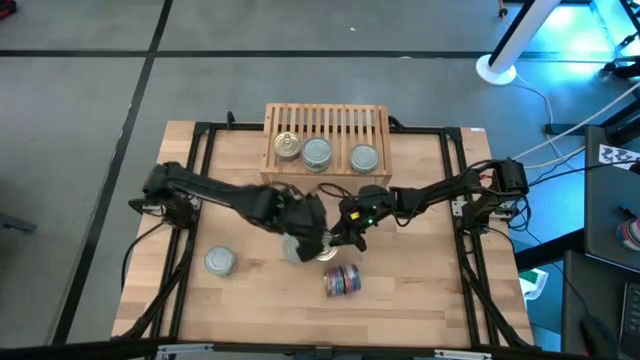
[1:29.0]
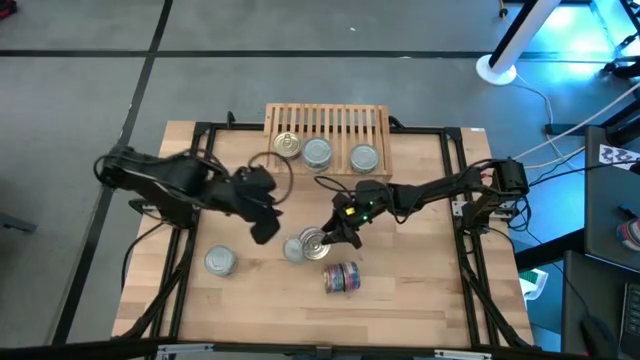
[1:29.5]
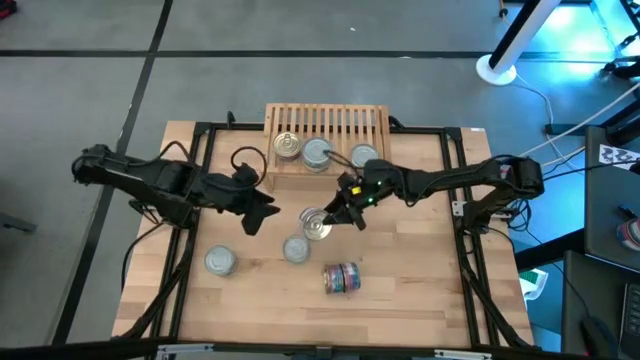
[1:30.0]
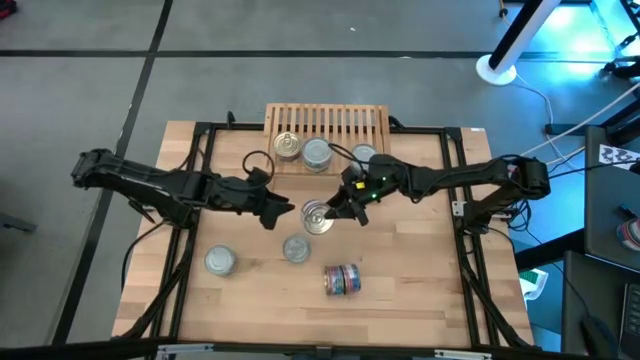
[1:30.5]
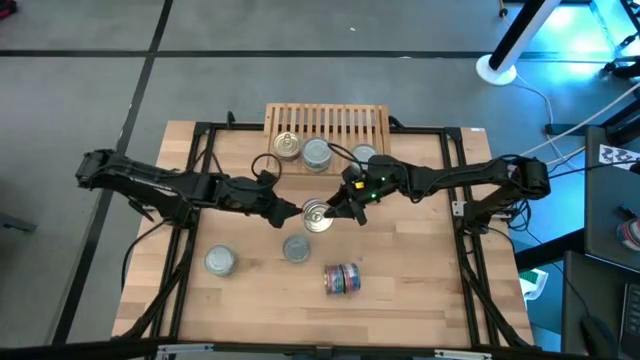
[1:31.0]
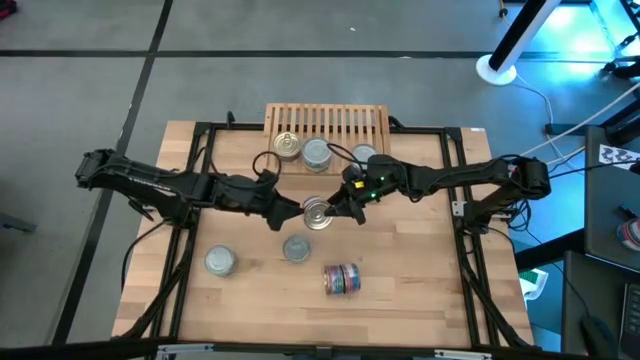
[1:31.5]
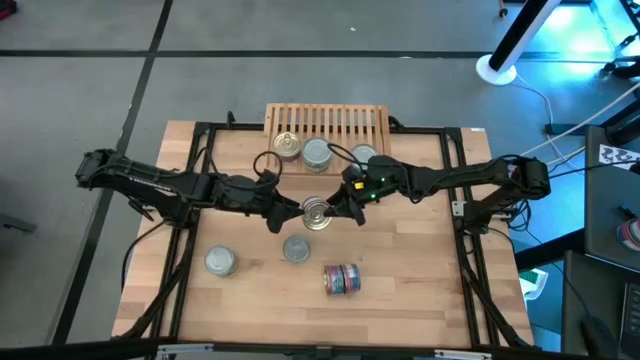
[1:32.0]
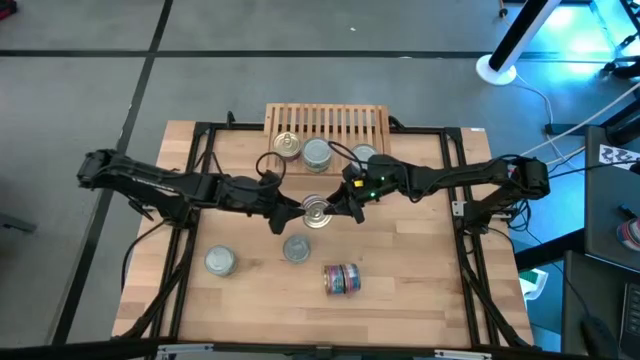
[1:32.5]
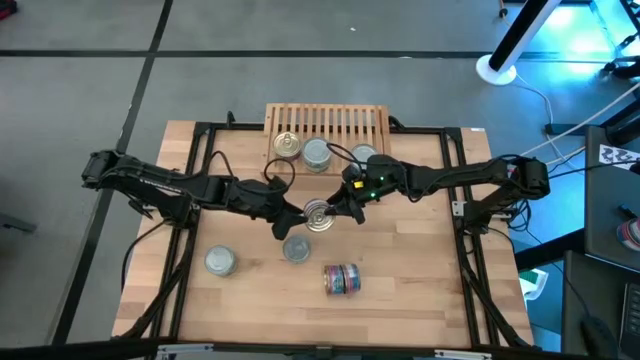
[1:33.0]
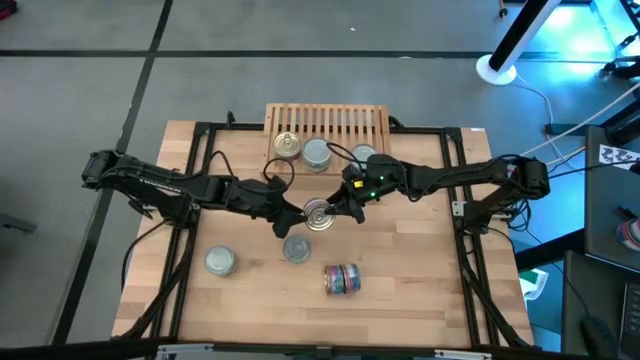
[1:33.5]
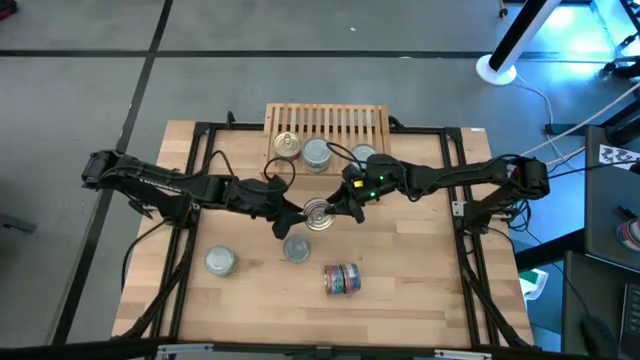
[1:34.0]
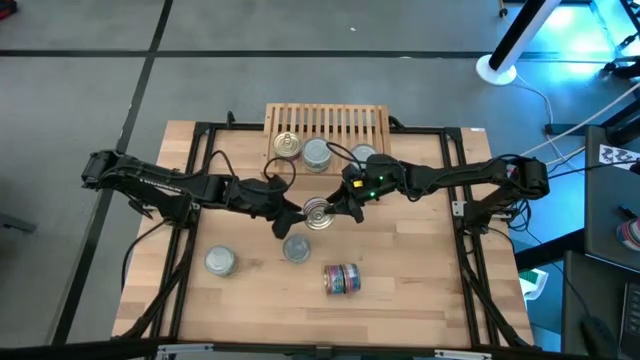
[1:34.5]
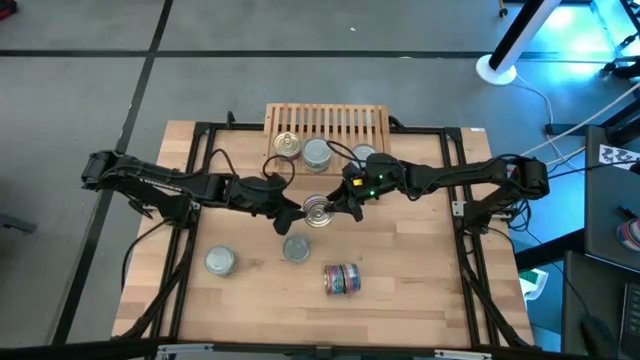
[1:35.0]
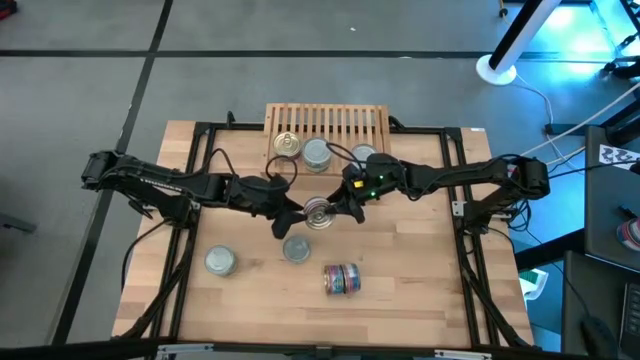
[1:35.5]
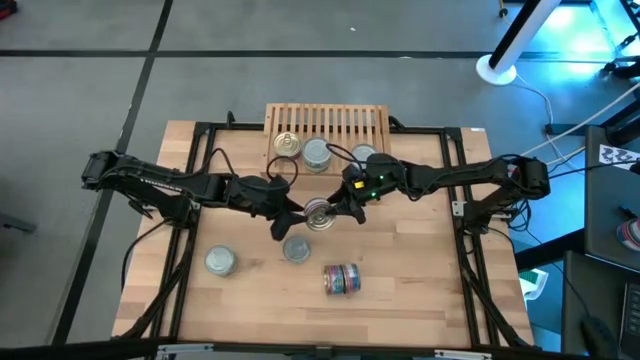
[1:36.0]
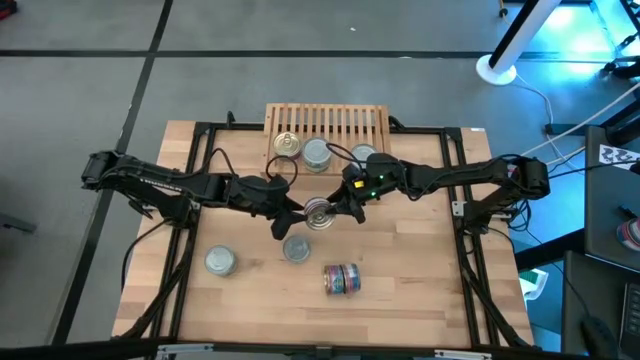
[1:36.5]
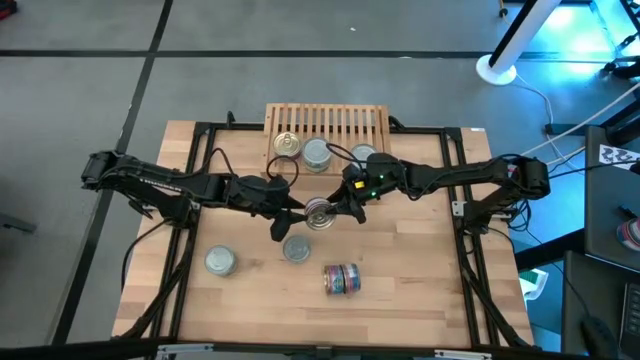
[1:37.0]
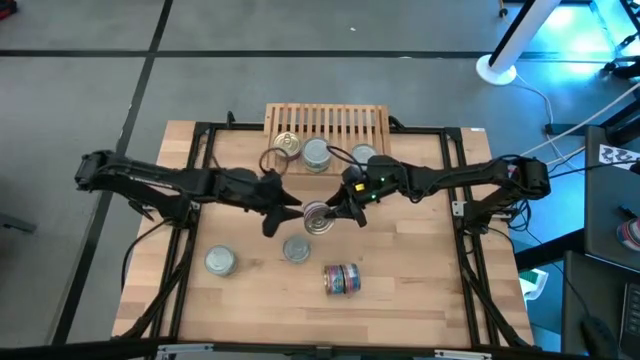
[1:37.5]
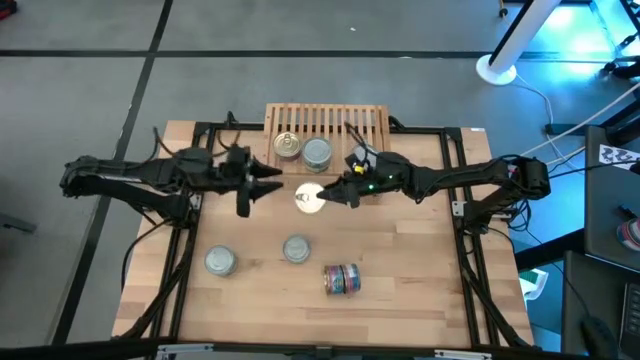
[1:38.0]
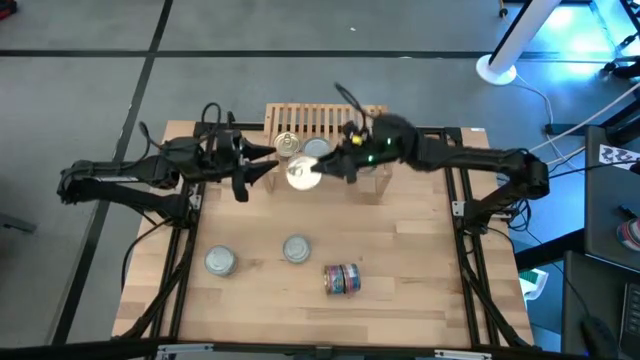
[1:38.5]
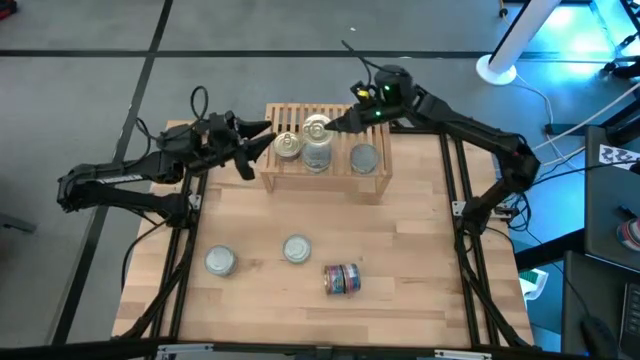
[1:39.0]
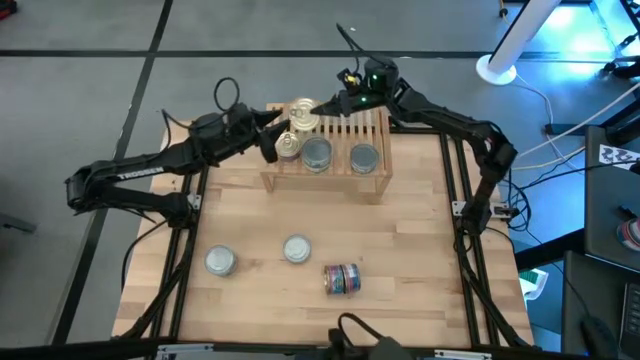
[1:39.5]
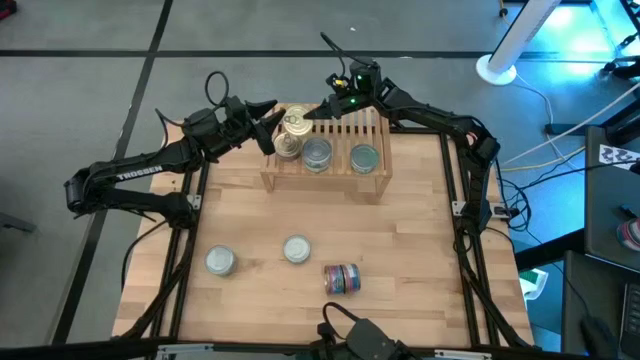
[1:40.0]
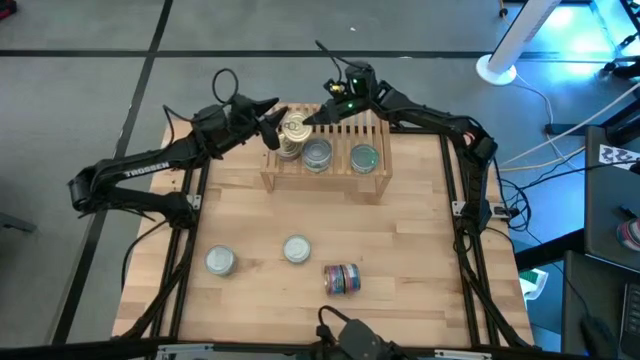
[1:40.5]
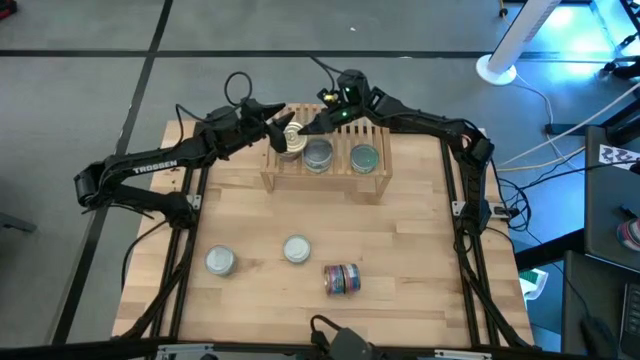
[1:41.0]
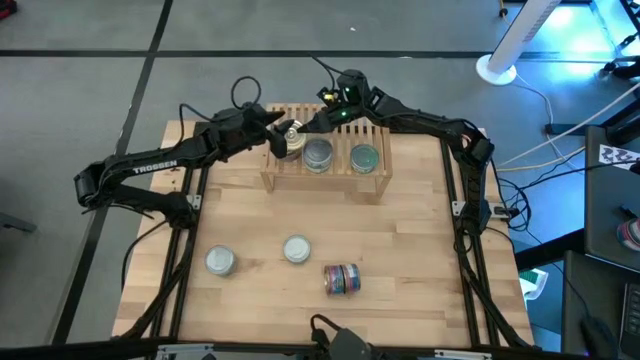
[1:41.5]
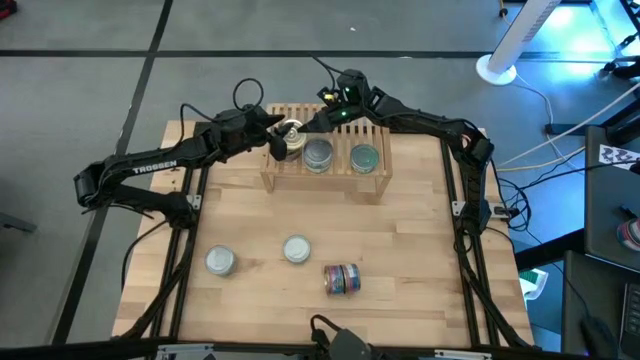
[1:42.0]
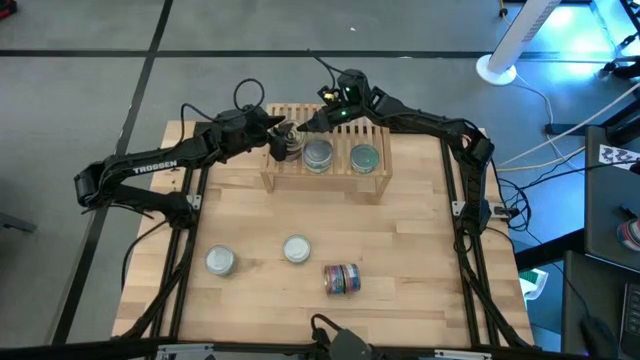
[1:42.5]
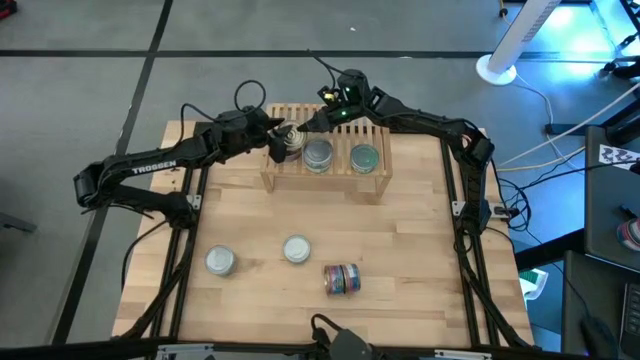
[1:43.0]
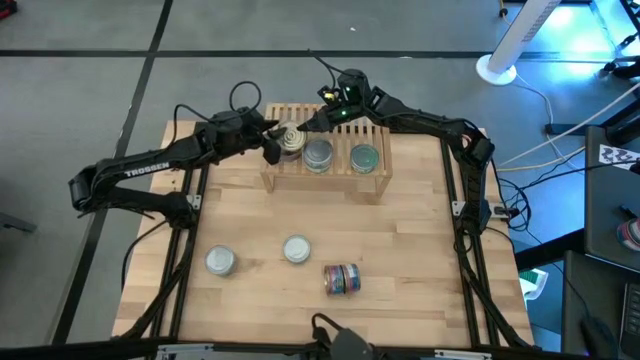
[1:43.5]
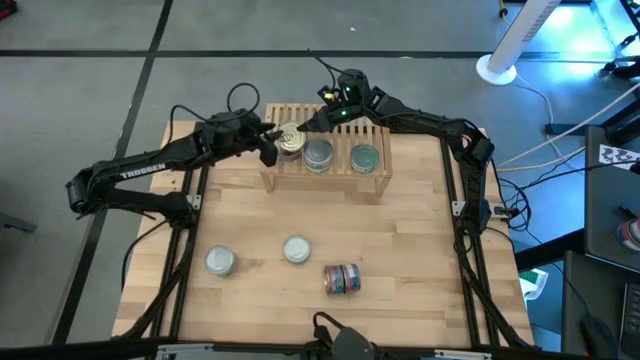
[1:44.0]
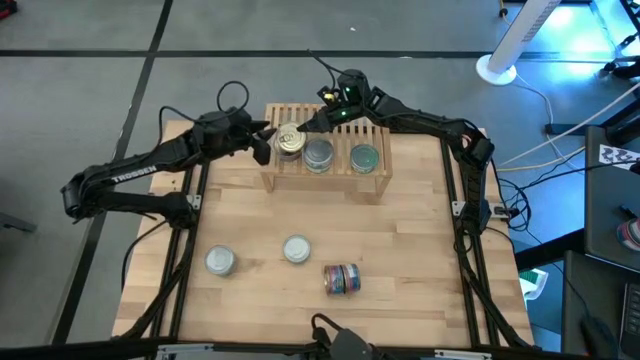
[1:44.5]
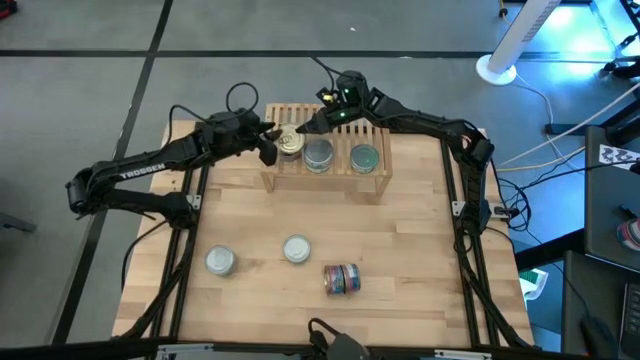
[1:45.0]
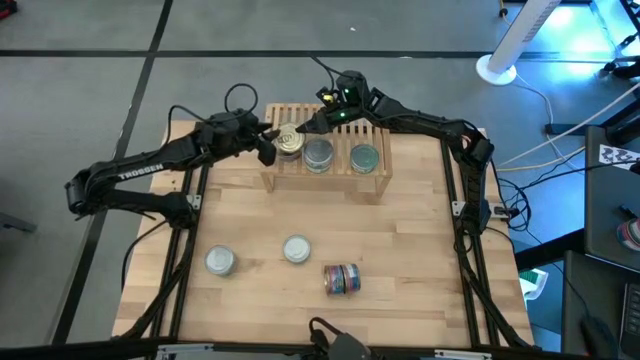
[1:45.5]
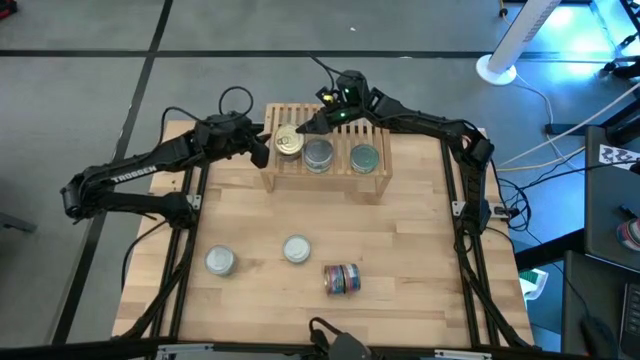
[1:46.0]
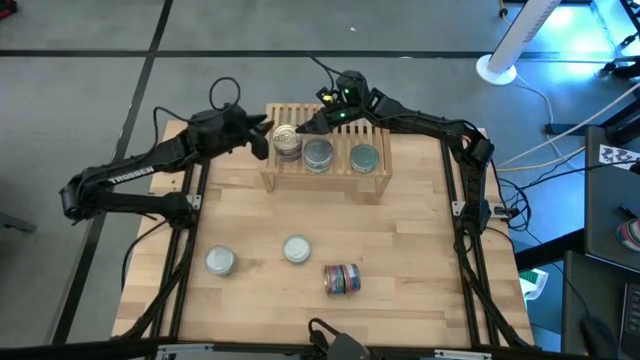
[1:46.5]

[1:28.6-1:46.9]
Task: Stack canned seafood by type on shelf
Stack the blue-pink tuna can on top of the other blue-pink tuna can on the shelf

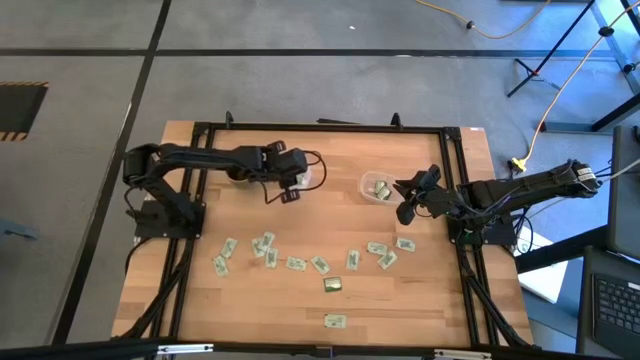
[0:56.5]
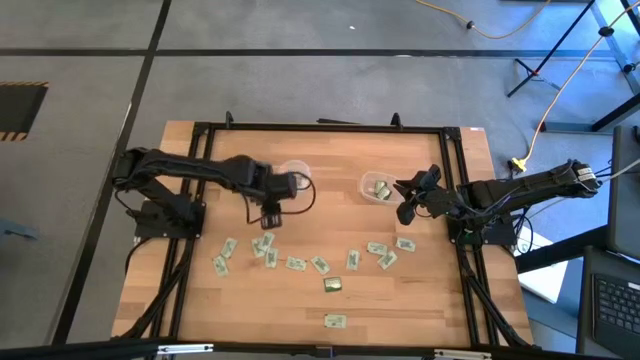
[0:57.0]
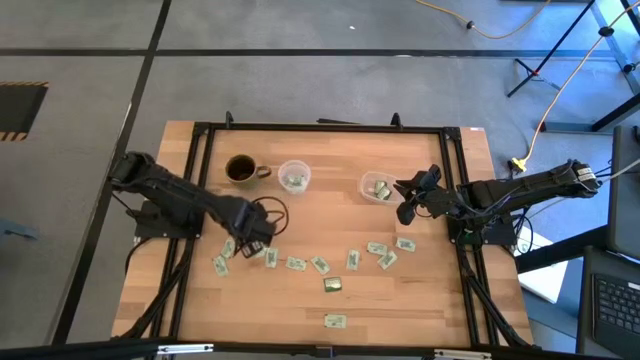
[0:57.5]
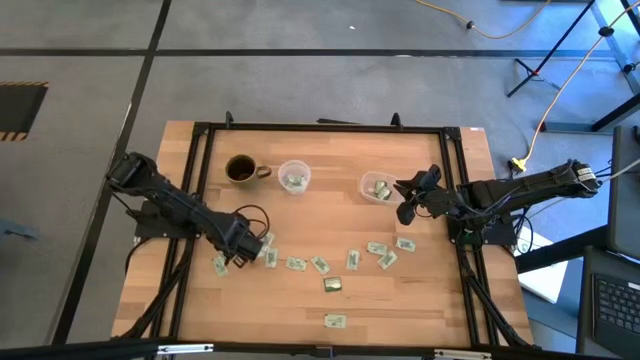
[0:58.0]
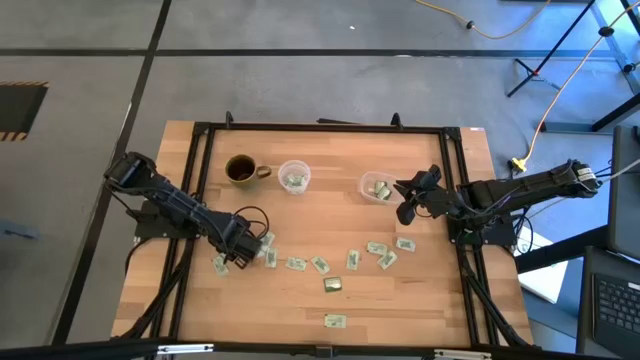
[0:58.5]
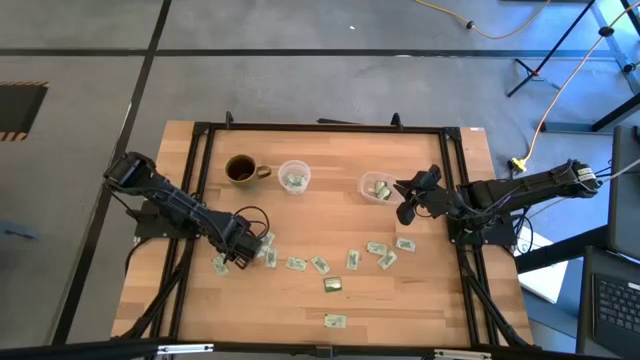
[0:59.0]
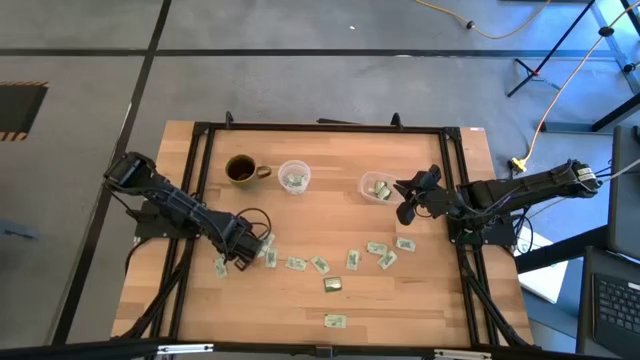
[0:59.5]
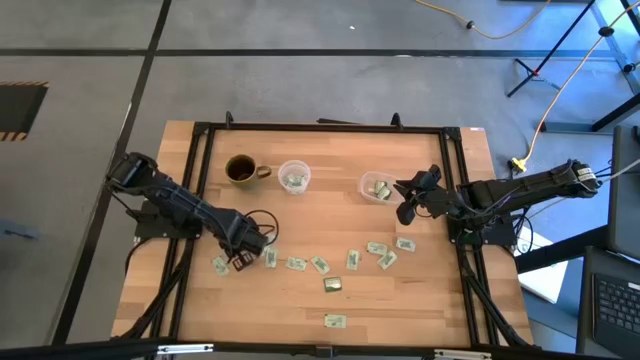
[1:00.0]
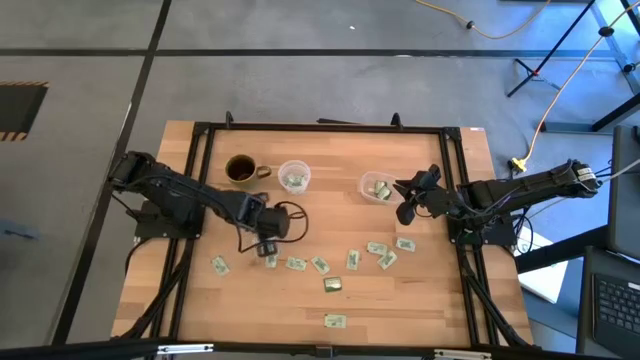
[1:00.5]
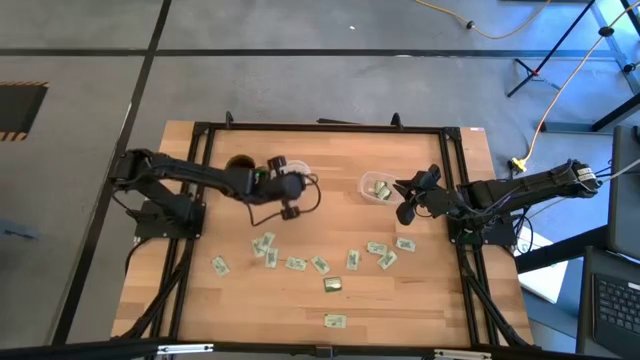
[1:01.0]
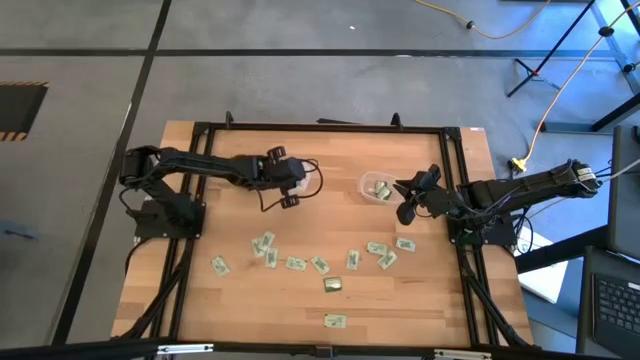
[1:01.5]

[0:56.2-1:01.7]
Task: Pick and place items into bin
Put the white stevia packet into the left transparent bin
